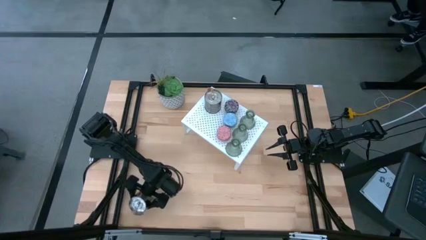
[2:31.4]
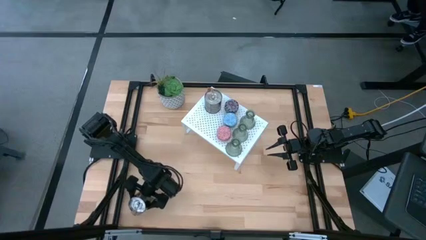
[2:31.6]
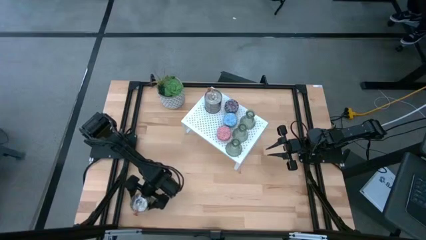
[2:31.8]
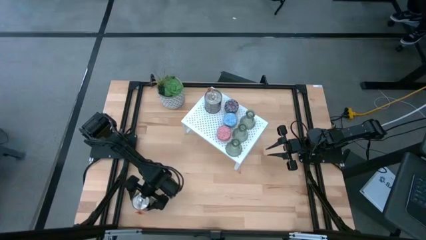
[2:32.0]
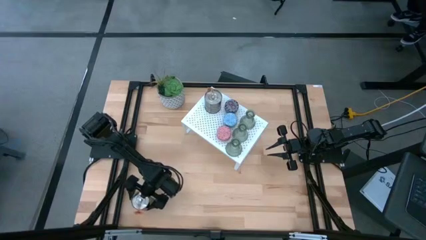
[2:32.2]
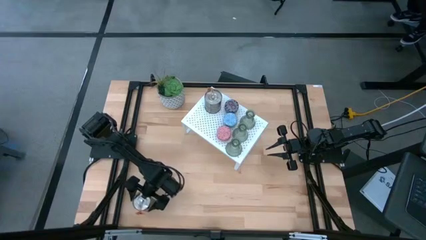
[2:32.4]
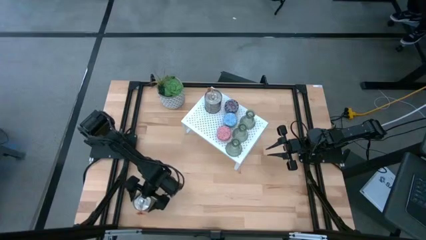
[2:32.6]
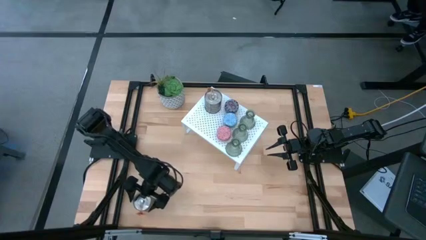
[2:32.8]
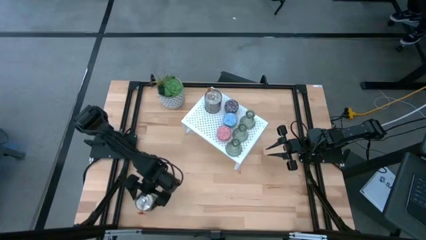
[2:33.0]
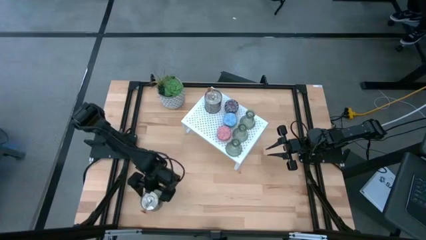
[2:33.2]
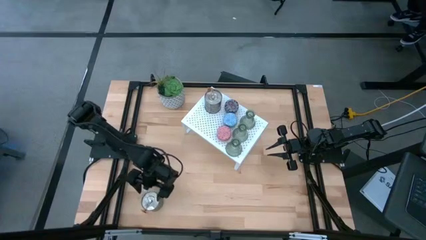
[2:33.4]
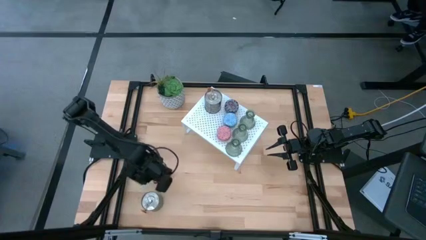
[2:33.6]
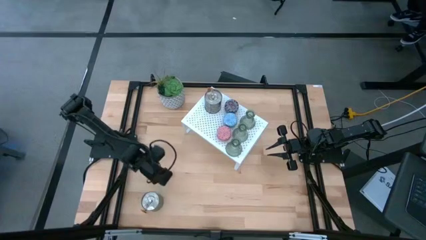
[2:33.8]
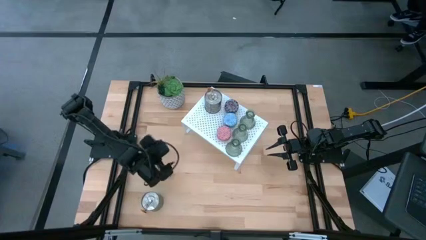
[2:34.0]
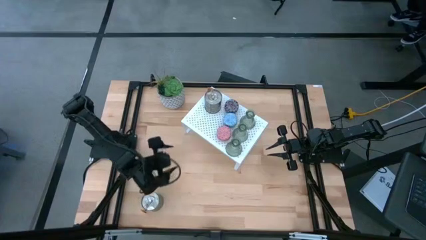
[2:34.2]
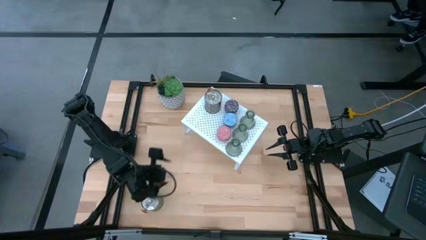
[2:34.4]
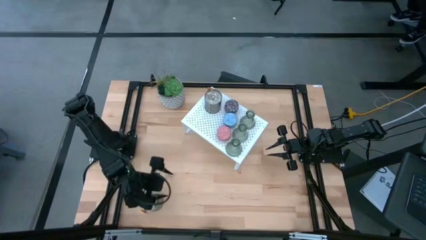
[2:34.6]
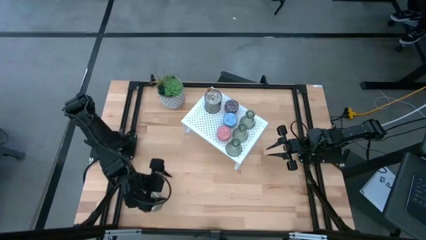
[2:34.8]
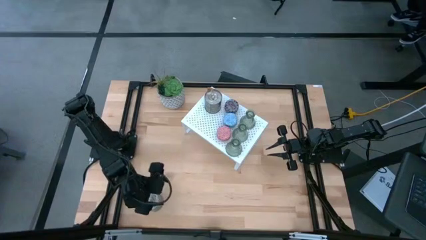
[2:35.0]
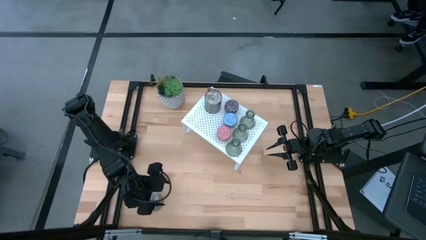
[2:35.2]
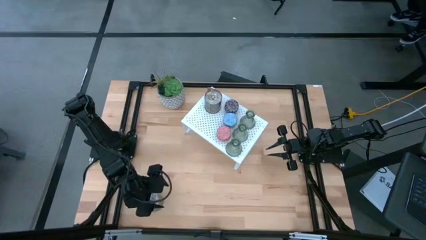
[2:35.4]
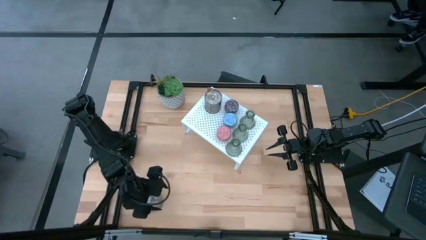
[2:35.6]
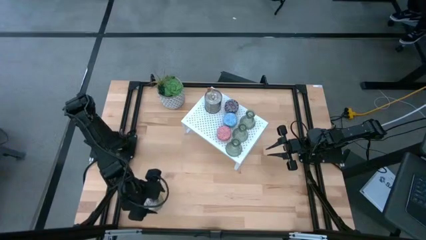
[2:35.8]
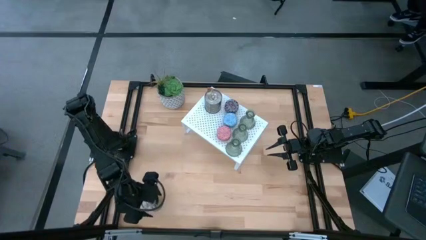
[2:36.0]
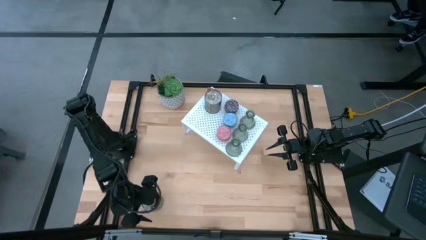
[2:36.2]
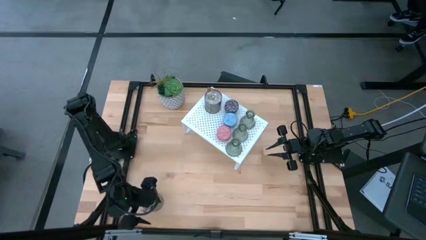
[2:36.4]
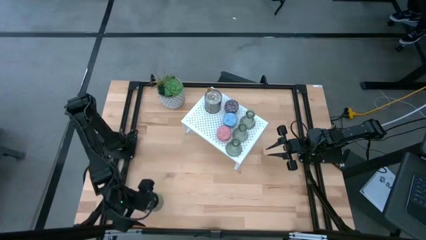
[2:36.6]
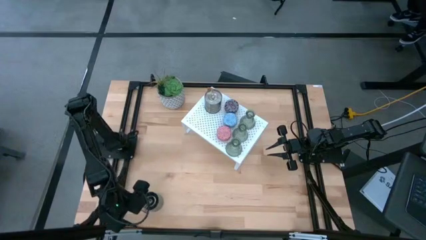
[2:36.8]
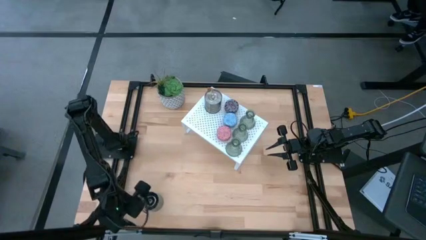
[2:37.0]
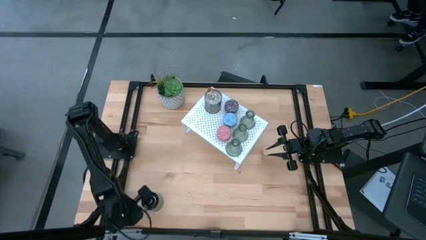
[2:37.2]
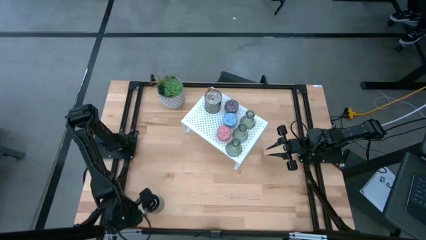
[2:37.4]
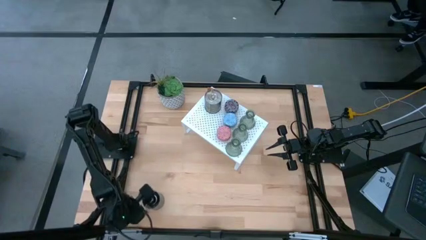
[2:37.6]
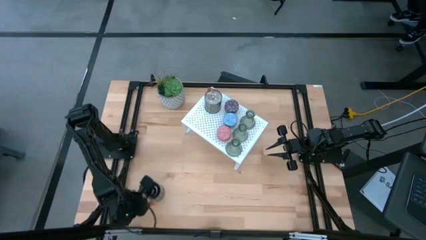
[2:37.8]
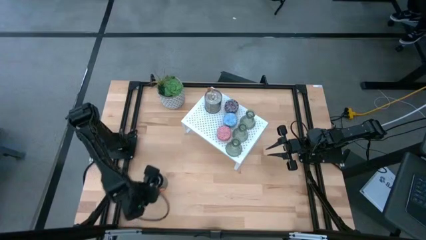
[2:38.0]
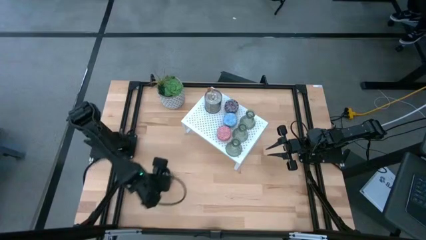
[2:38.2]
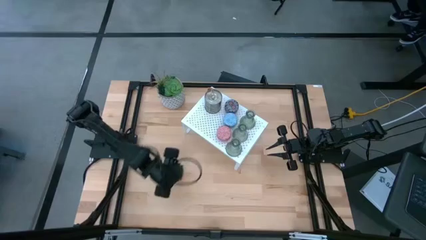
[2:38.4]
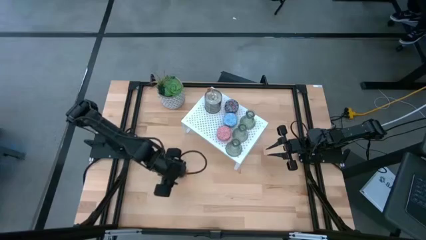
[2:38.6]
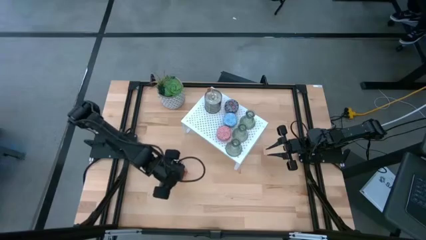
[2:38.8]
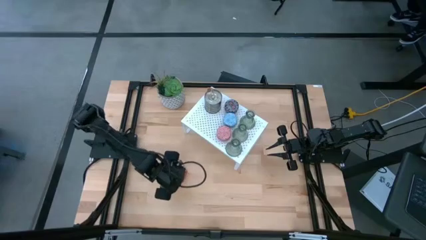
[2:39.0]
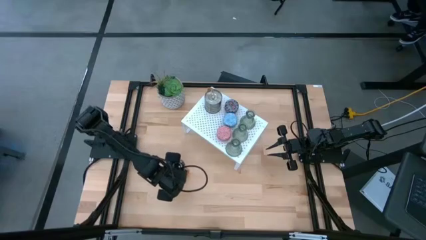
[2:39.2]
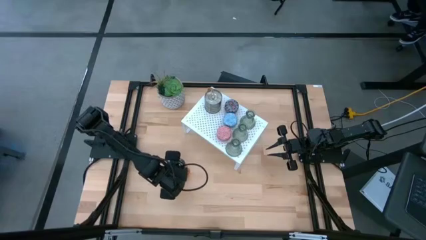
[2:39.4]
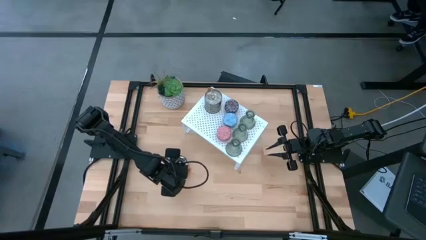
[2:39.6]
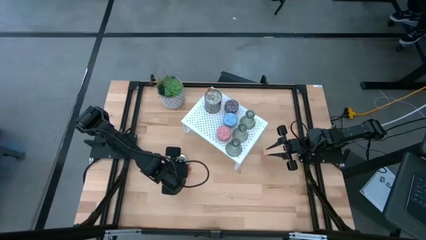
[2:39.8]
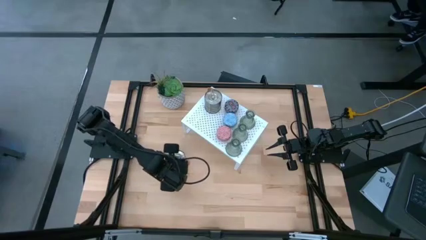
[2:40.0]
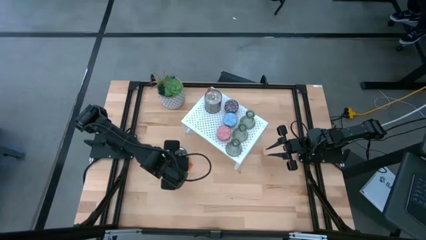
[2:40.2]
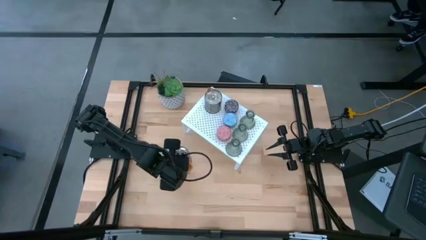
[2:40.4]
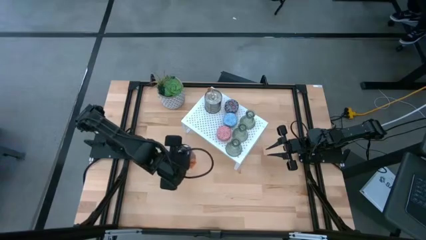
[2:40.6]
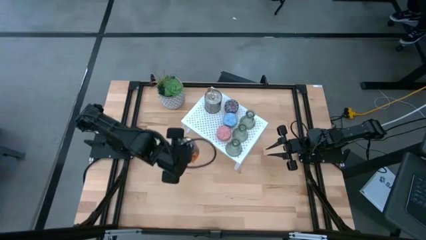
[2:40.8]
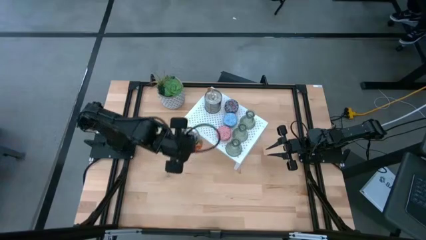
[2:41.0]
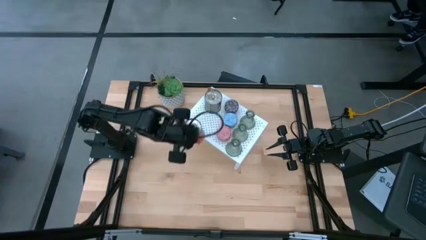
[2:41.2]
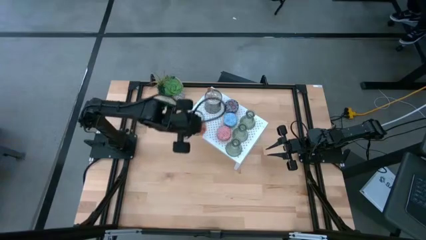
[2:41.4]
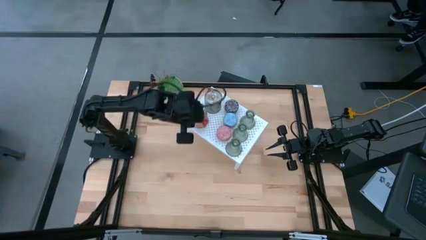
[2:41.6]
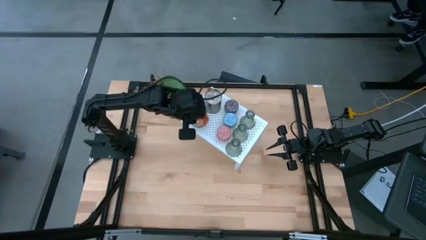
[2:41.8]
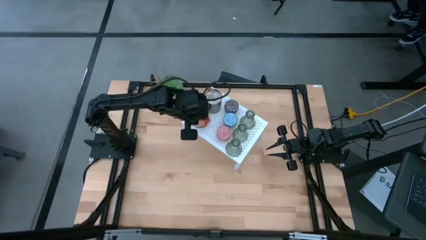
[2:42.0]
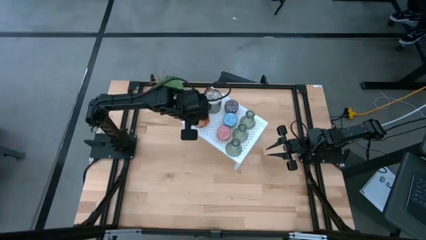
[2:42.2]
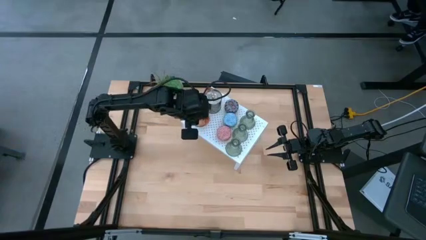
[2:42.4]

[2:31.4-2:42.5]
Task: Pick & Place candle stick holders
Put the silver scented candle on the shelf aligned with the other silver scented candle on the shelf

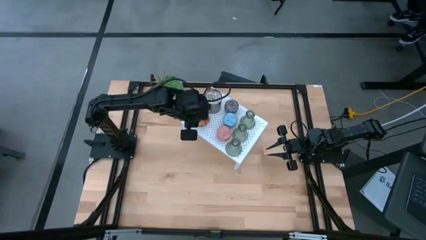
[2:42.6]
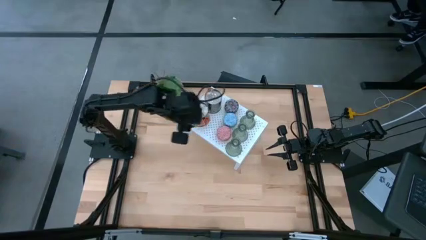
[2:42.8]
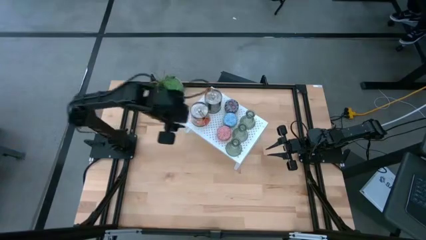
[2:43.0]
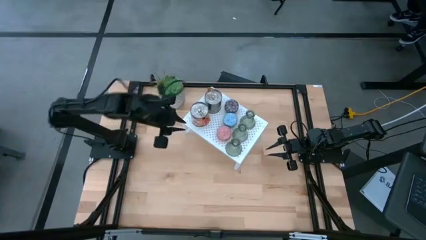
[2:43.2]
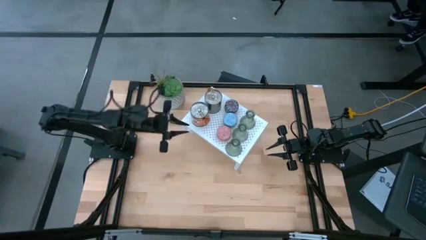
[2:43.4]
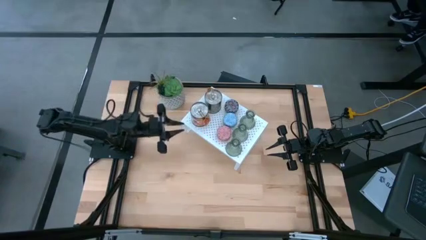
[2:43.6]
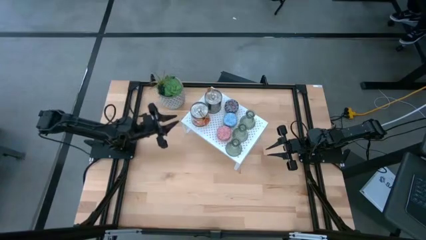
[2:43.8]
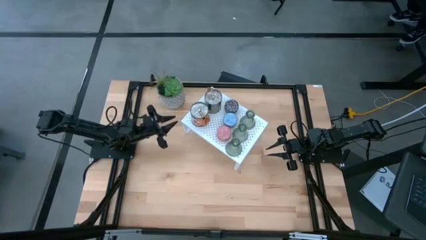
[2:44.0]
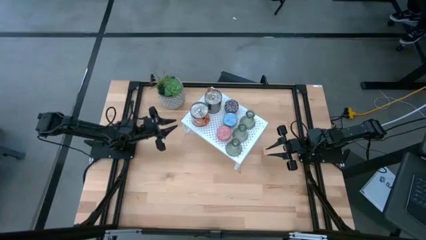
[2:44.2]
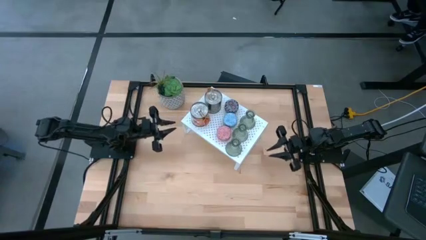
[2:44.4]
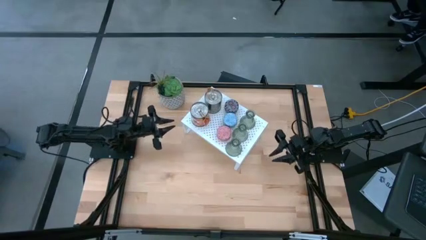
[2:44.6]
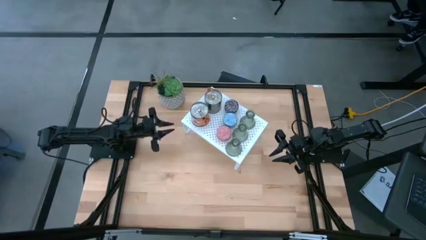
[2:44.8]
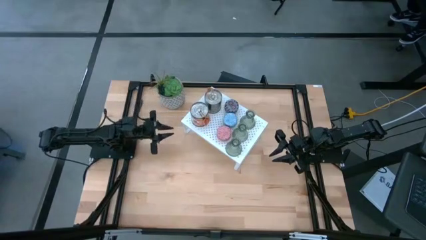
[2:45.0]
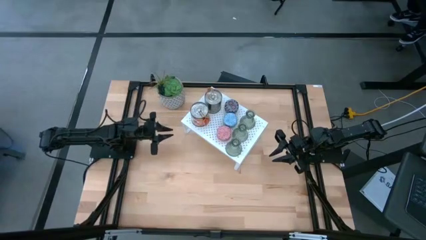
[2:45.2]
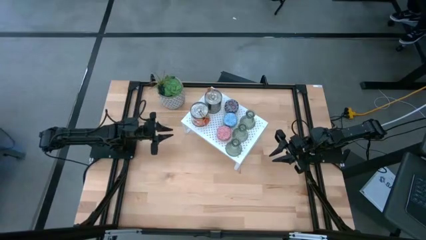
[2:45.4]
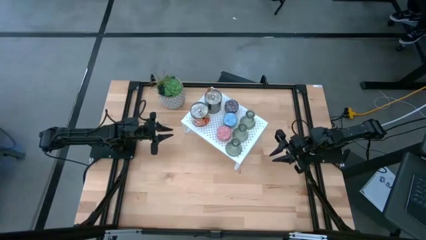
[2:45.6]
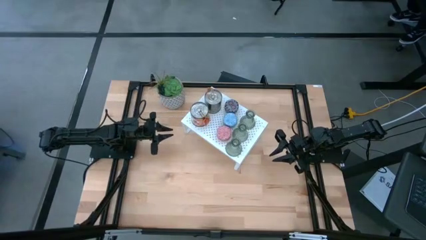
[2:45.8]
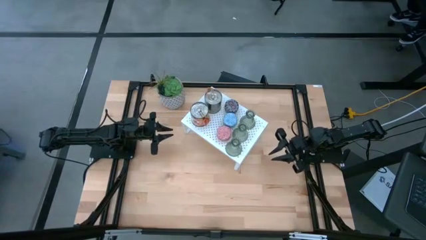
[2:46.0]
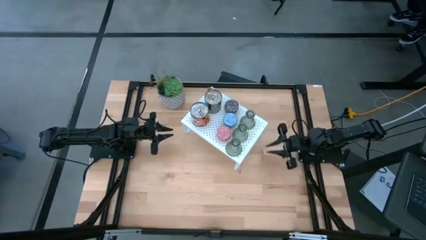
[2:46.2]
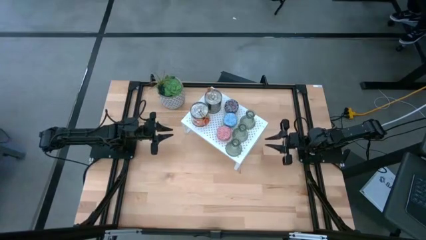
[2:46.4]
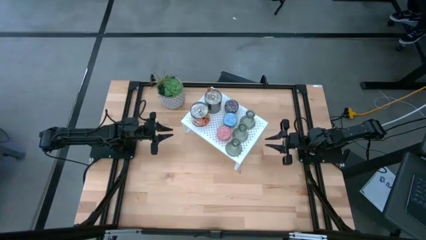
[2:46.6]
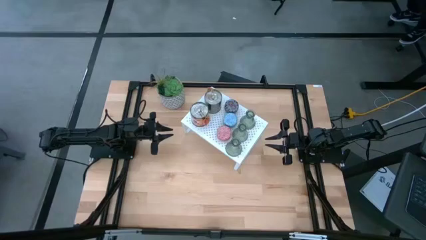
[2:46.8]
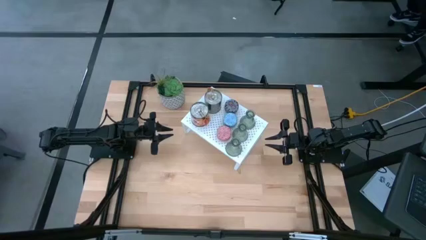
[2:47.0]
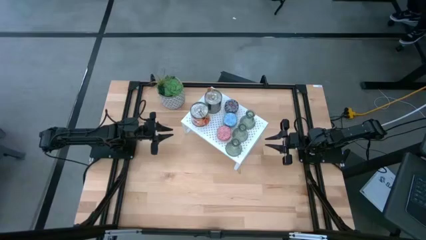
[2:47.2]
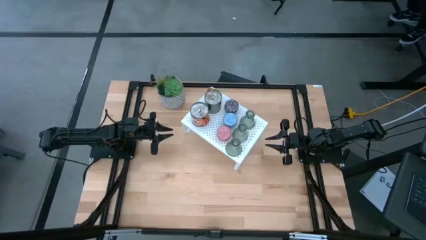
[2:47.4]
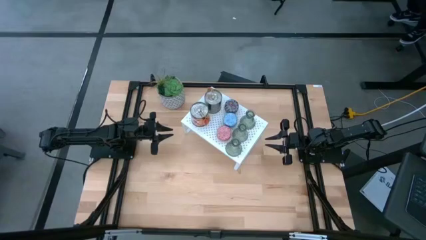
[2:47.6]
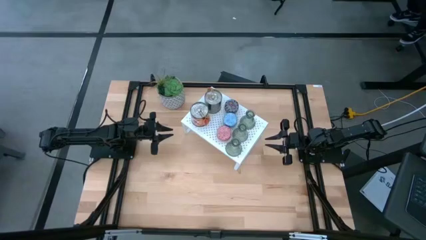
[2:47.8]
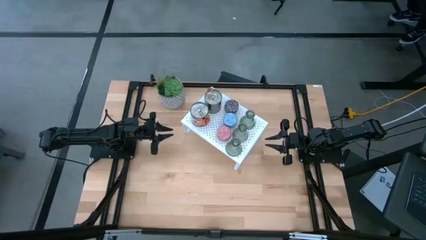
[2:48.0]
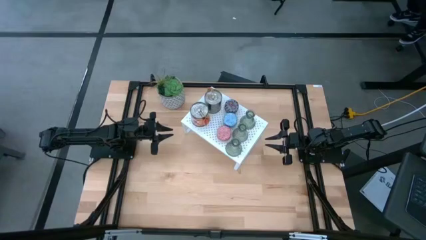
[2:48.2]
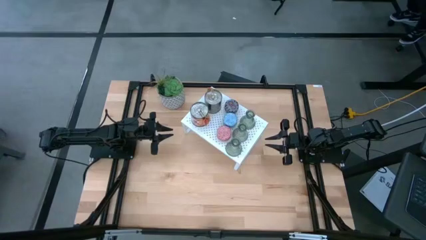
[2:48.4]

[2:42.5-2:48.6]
Return to Home Position
